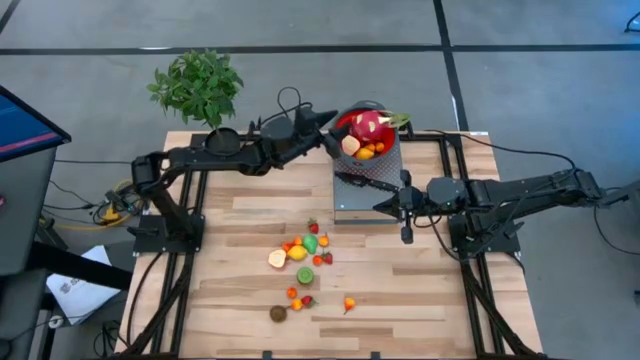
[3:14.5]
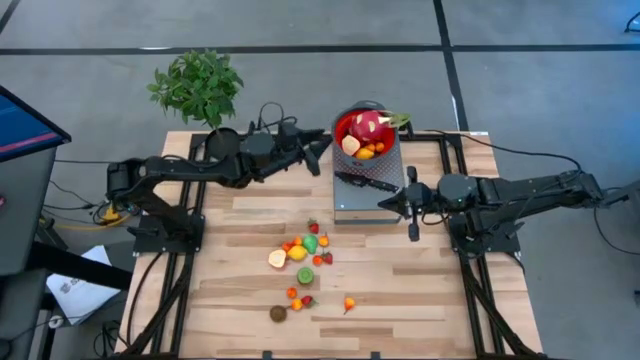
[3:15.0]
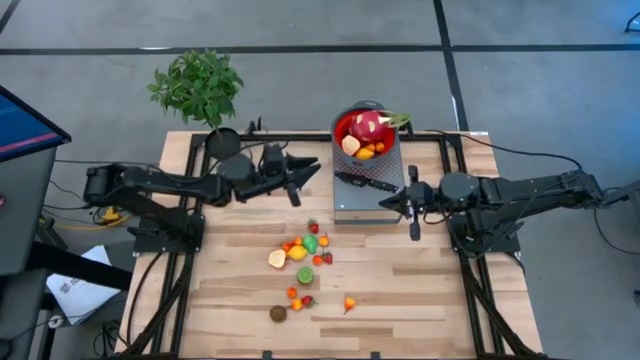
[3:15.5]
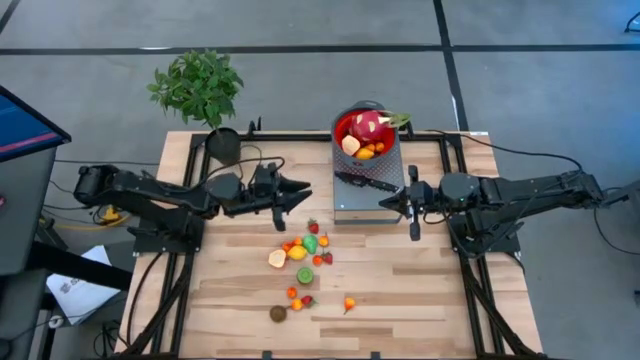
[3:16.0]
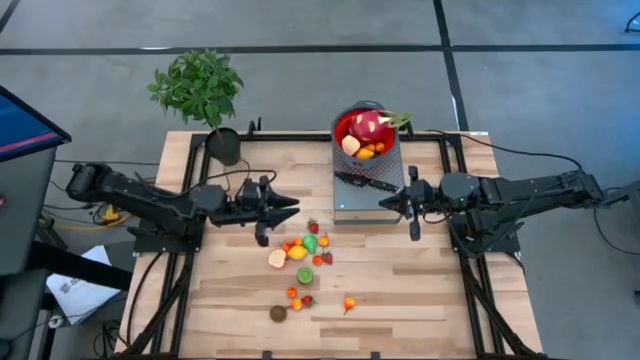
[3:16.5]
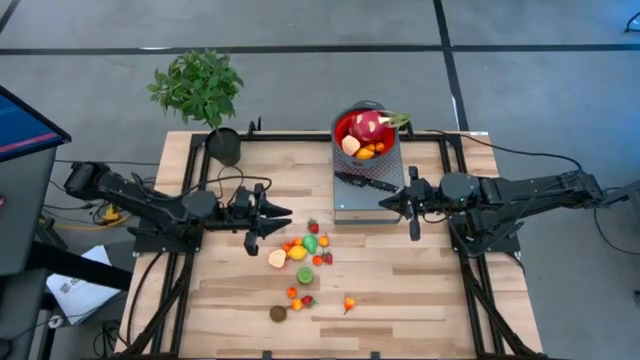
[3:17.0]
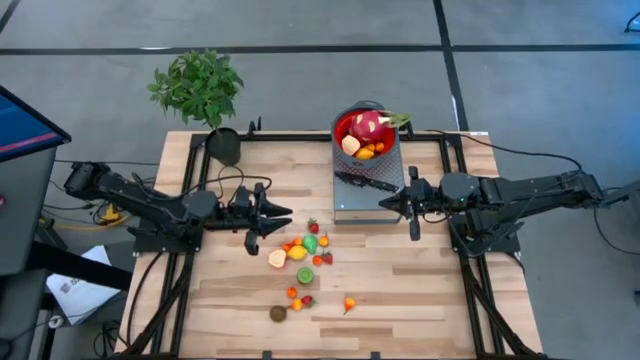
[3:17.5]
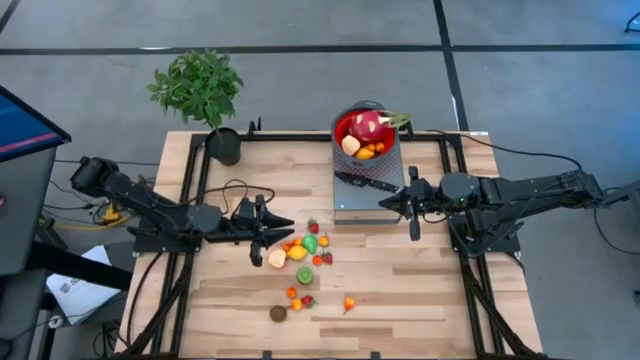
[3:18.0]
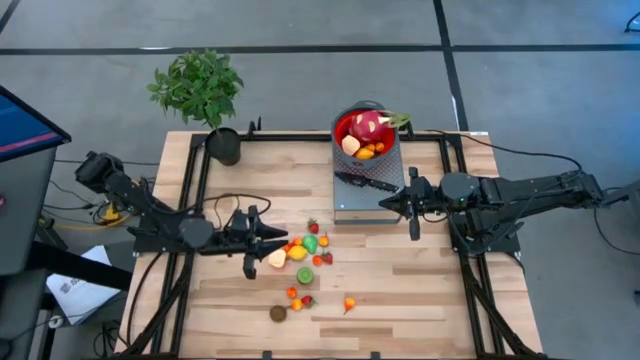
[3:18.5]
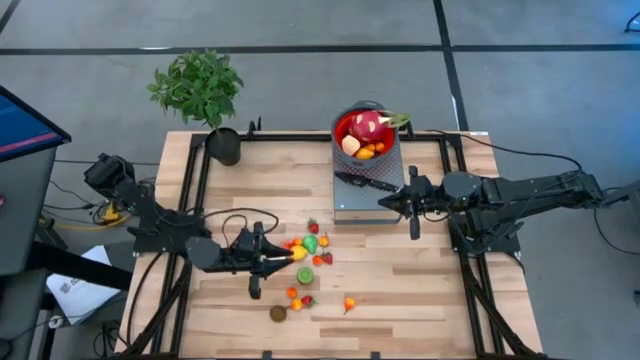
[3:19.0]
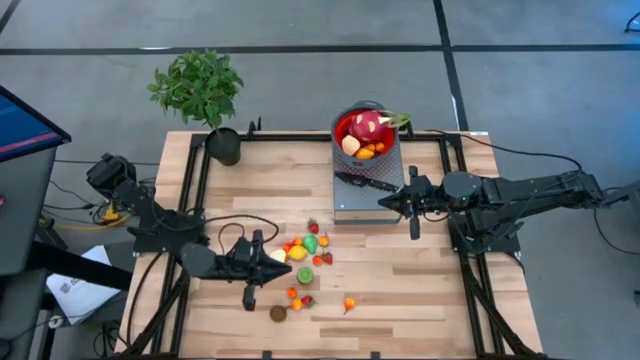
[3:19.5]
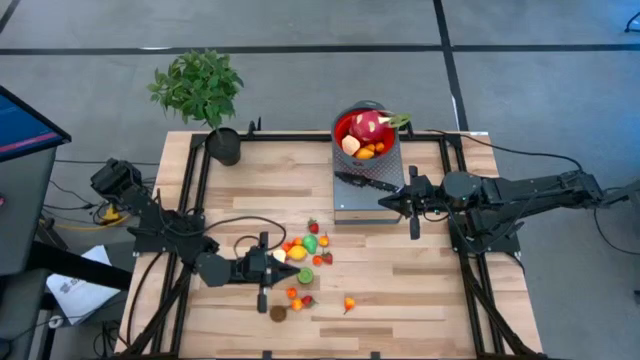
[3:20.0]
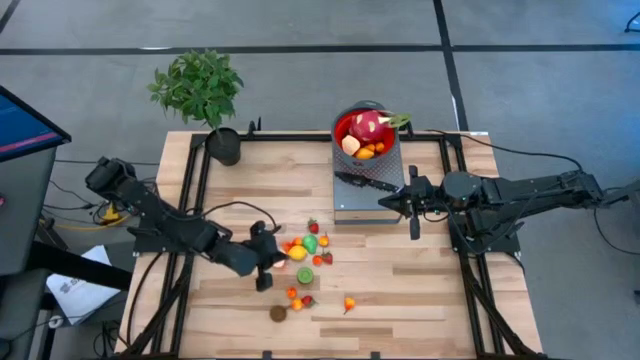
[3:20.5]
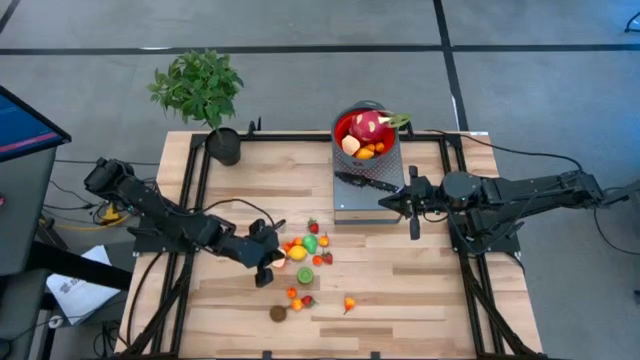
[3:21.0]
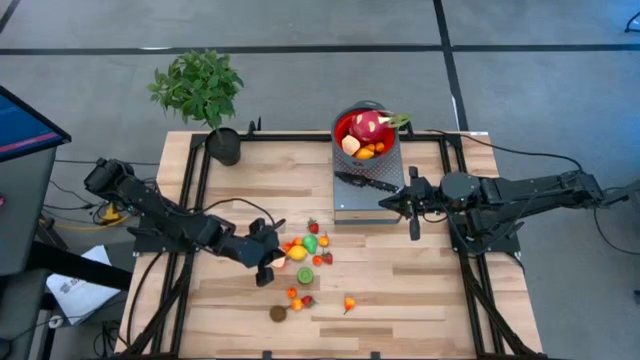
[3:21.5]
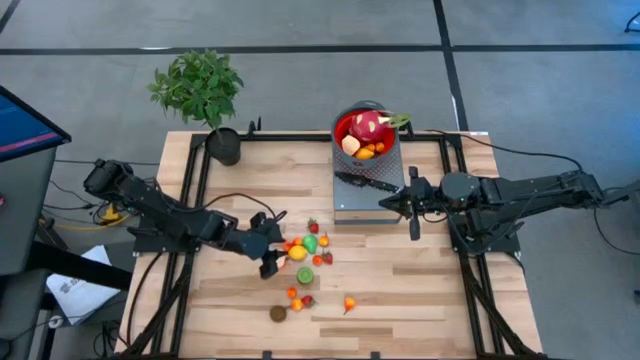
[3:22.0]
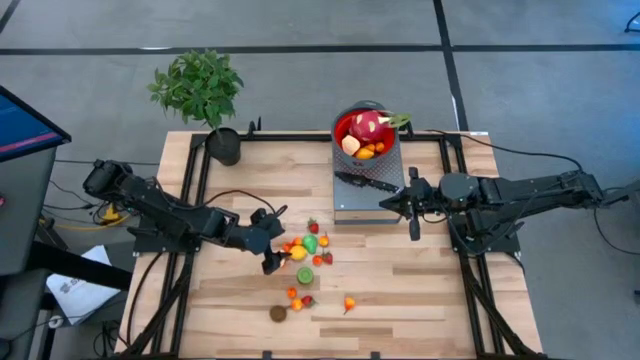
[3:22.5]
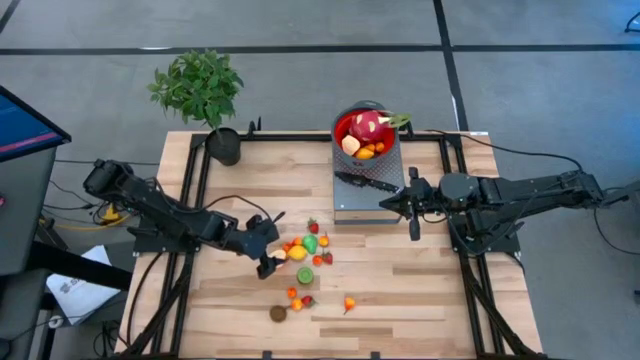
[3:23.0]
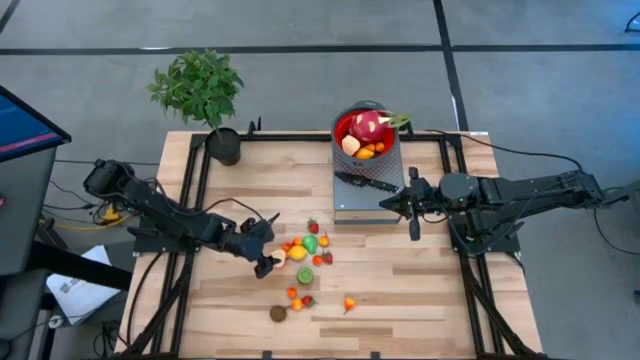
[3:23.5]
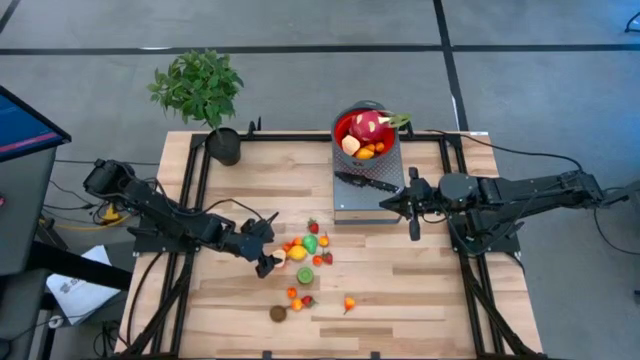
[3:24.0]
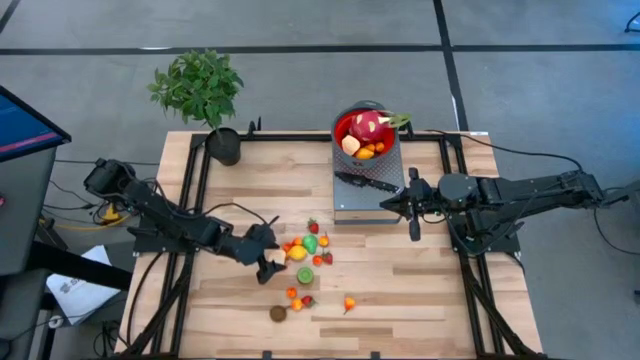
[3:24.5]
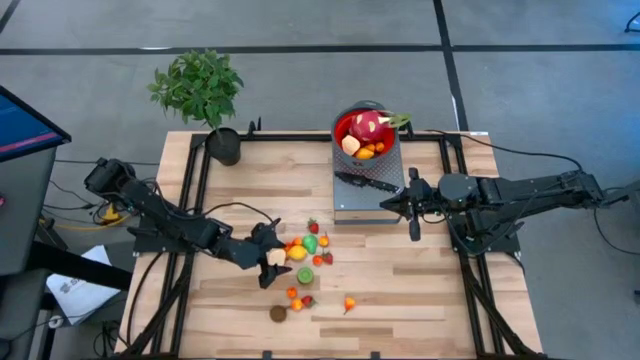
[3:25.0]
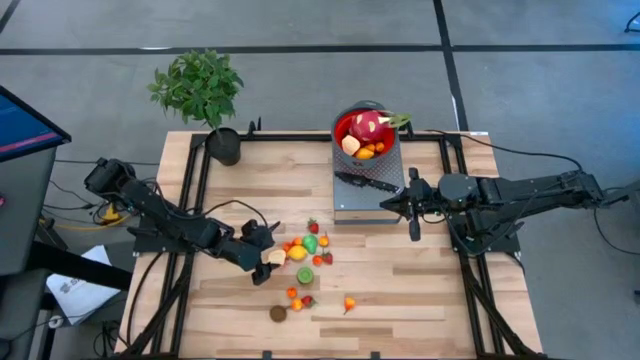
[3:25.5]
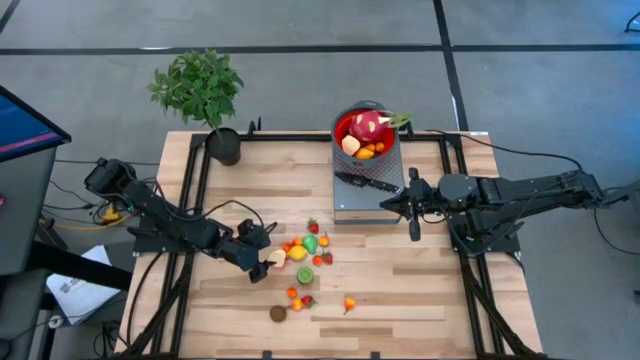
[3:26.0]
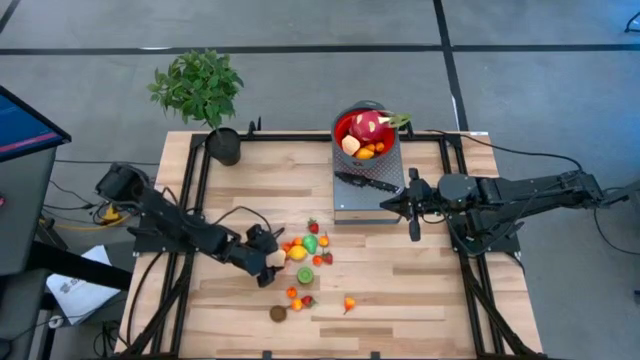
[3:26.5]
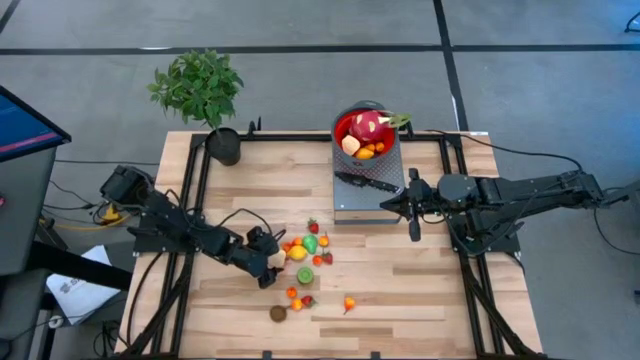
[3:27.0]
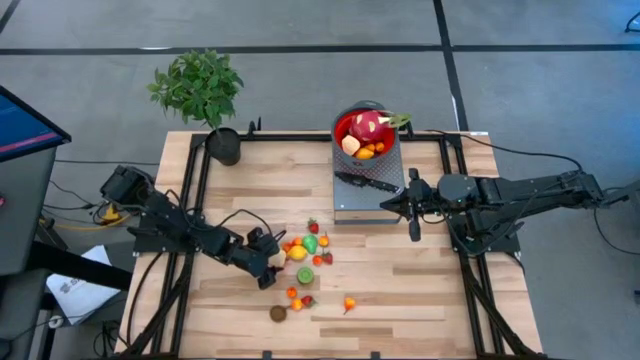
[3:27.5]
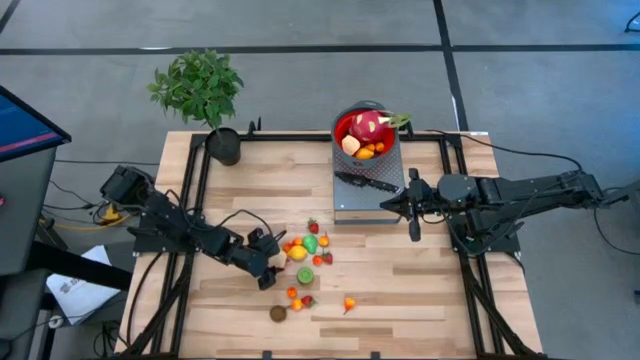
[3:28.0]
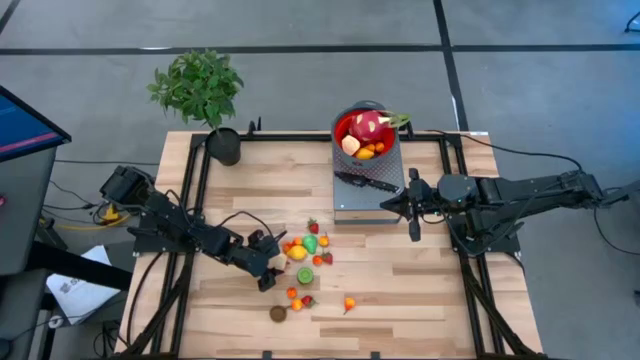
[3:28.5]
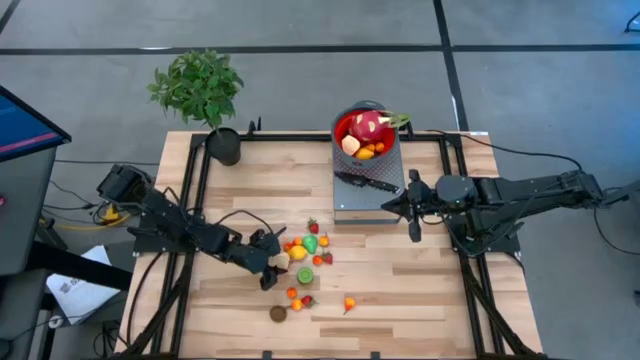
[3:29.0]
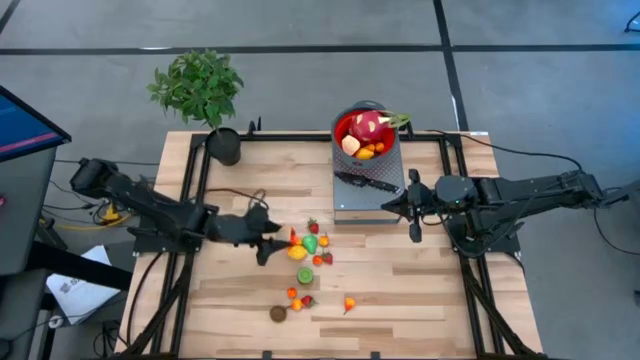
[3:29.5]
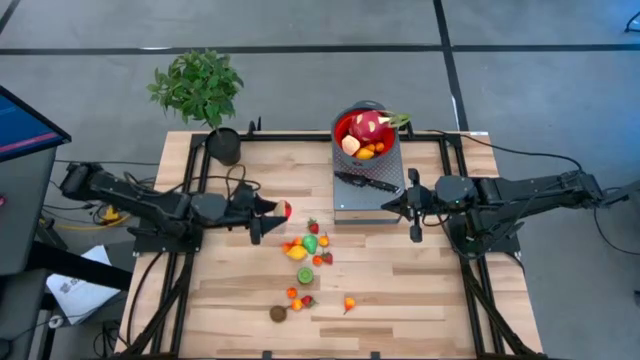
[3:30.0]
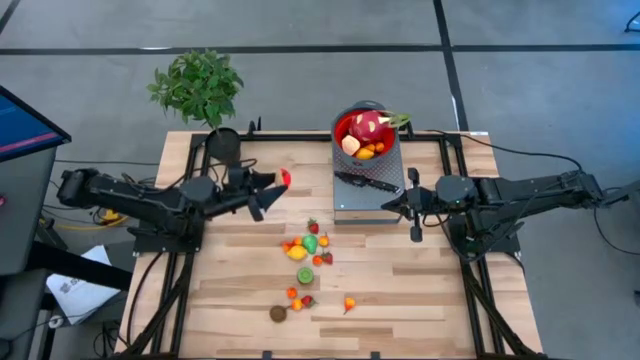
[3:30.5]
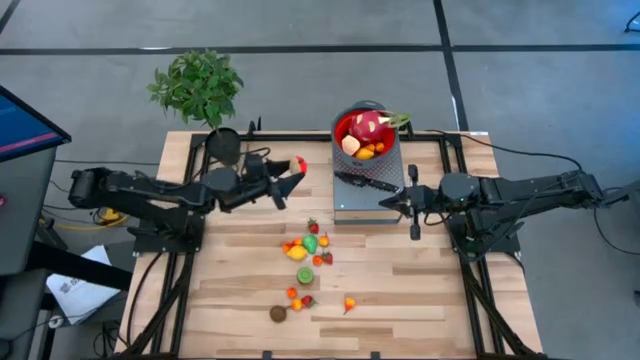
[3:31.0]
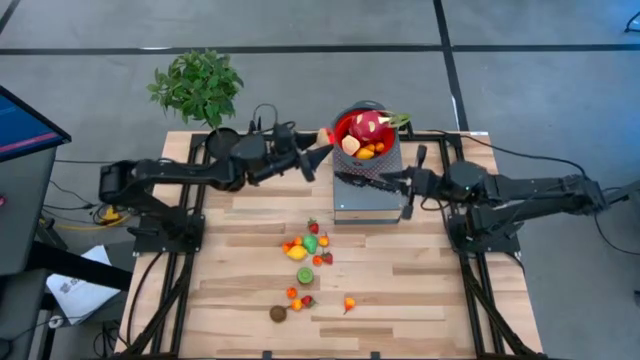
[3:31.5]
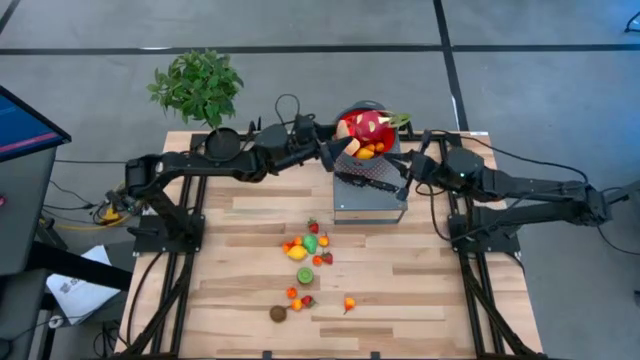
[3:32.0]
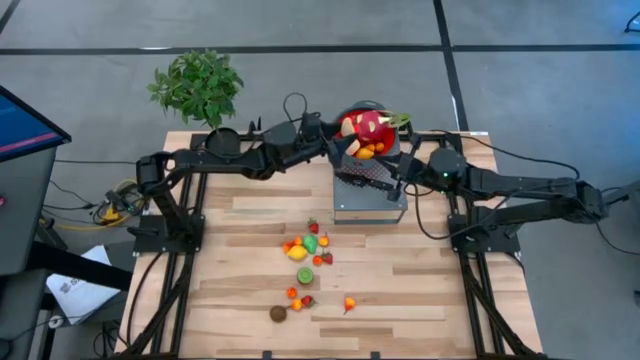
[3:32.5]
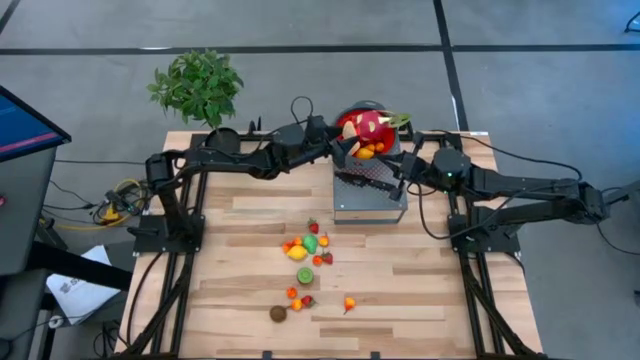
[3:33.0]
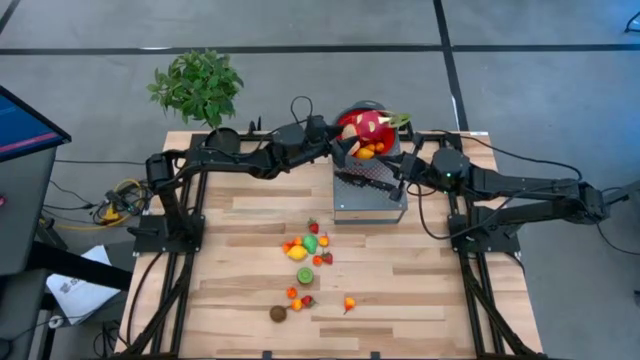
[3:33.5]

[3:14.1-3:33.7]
Task: Pick & Place Fruit
Put the red half apple into the red colander on the shelf

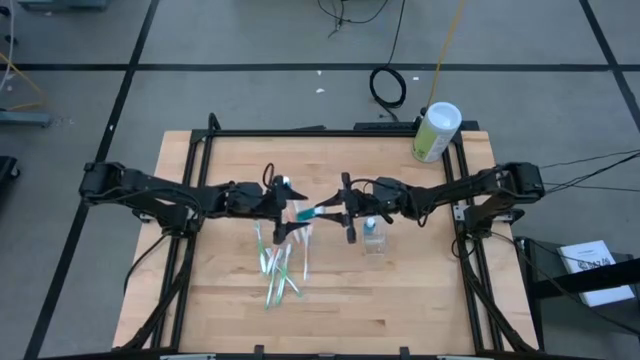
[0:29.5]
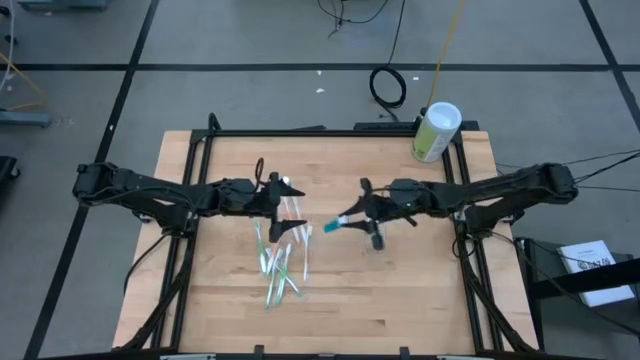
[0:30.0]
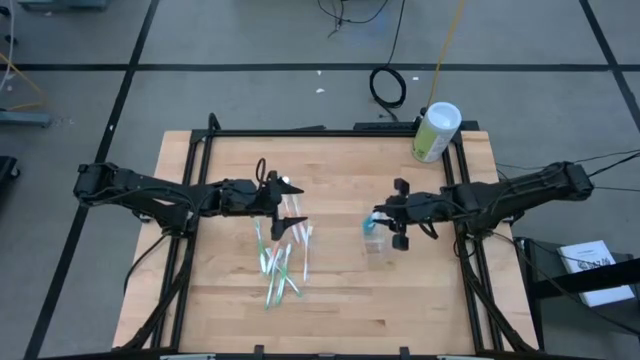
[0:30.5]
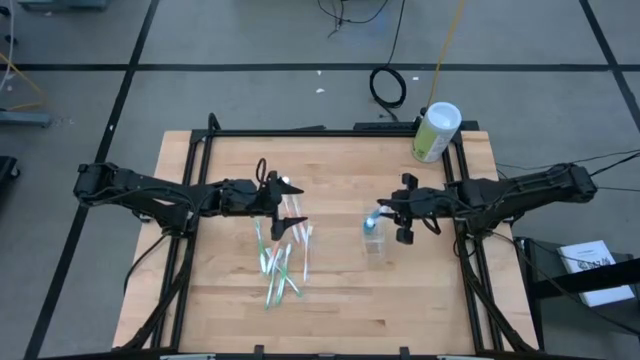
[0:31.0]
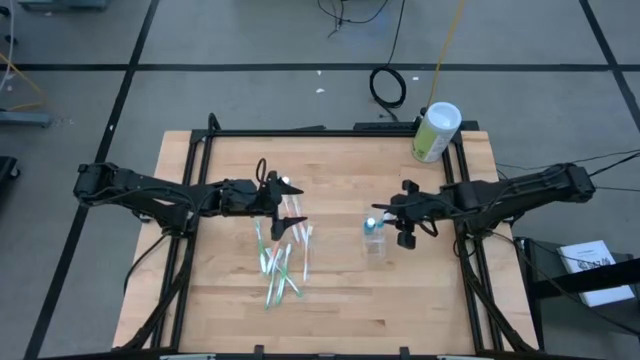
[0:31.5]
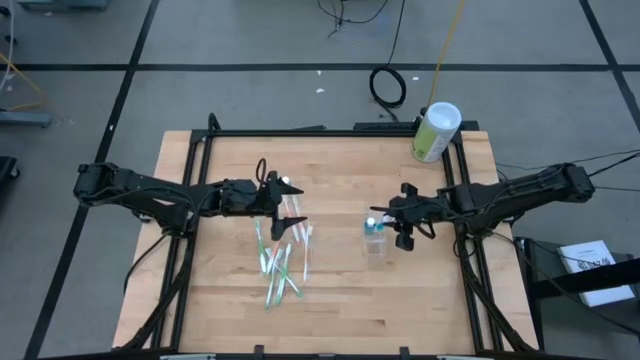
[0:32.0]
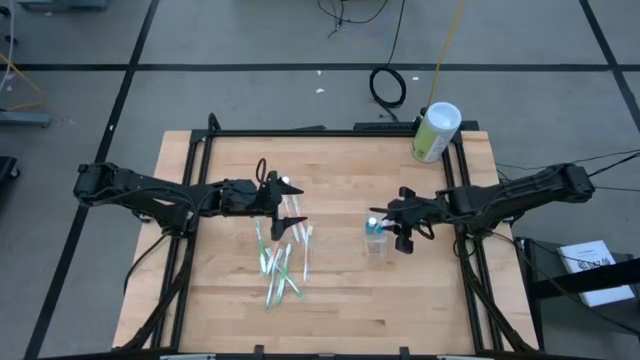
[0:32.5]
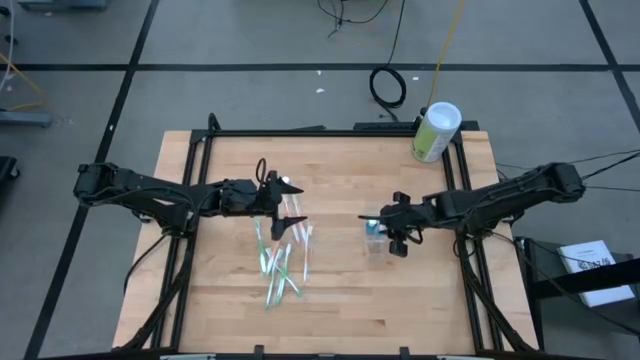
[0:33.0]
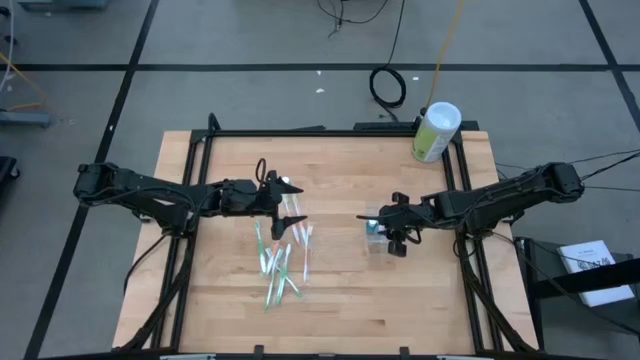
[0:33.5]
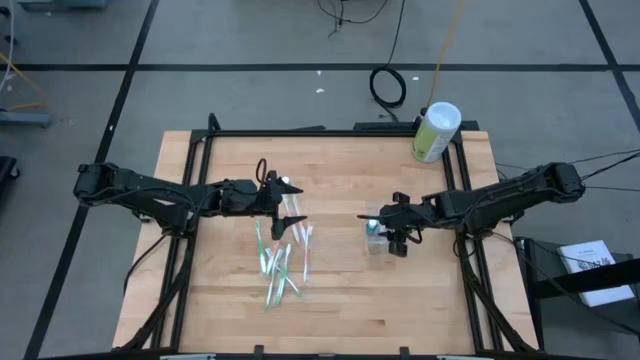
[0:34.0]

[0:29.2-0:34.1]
Task: Pick & Place toothbrushing station
Put the blue mouthwash into the middle of the transparent organizer
